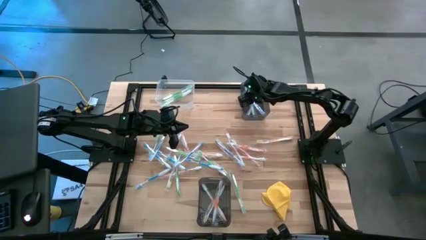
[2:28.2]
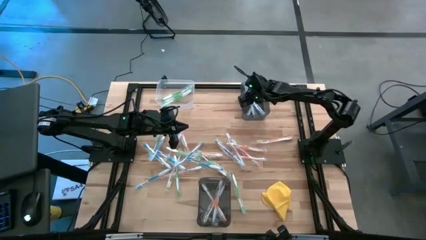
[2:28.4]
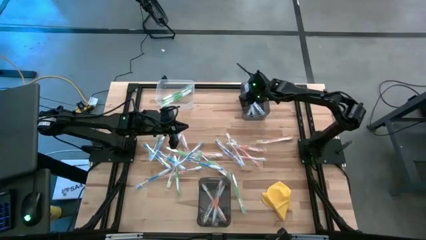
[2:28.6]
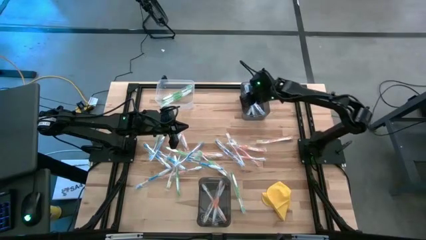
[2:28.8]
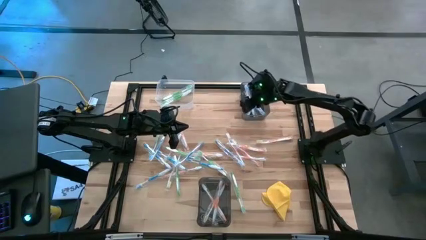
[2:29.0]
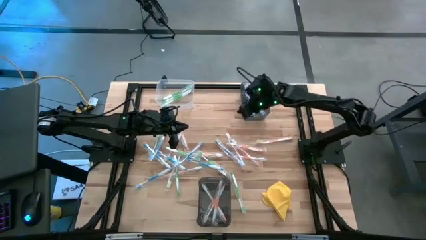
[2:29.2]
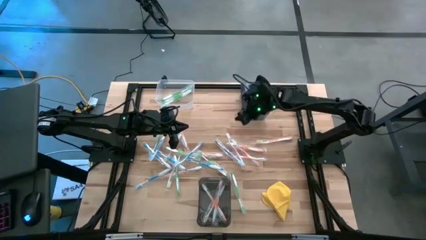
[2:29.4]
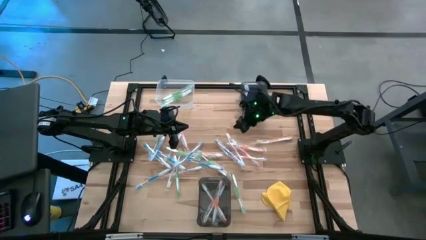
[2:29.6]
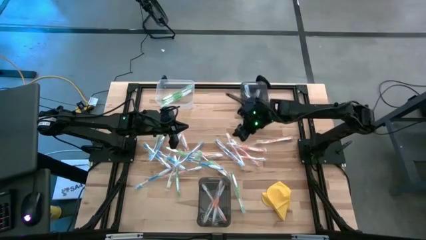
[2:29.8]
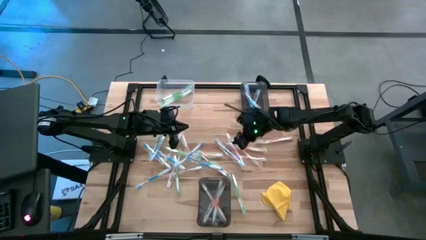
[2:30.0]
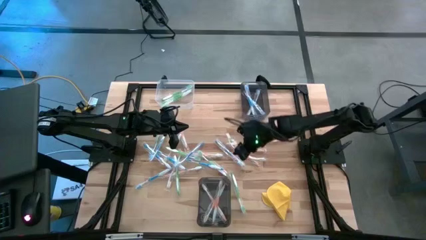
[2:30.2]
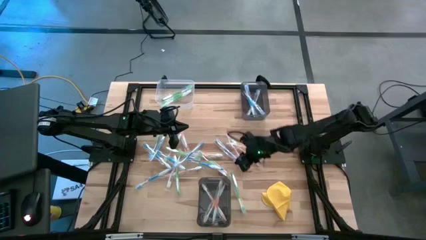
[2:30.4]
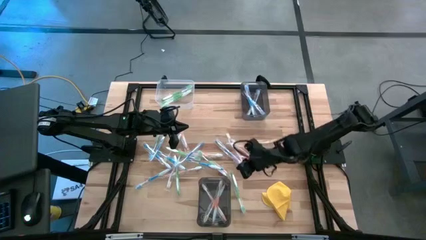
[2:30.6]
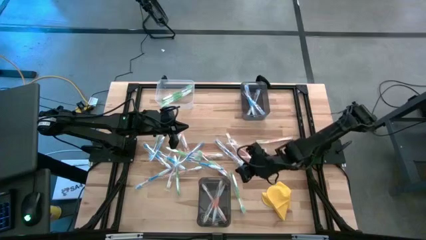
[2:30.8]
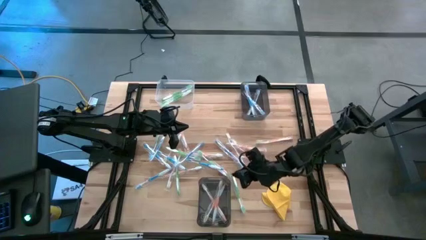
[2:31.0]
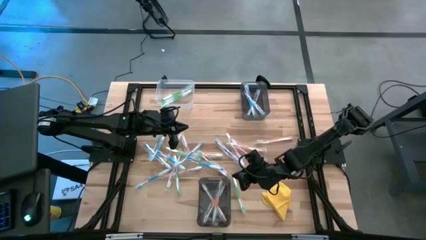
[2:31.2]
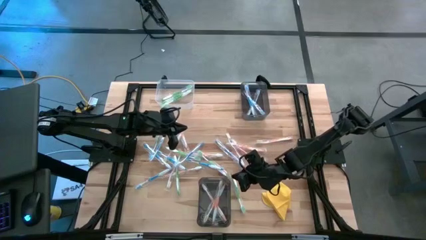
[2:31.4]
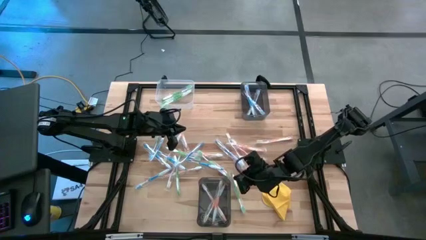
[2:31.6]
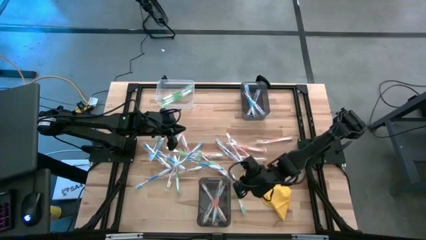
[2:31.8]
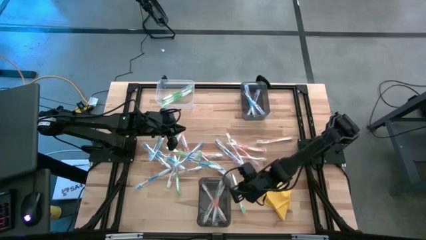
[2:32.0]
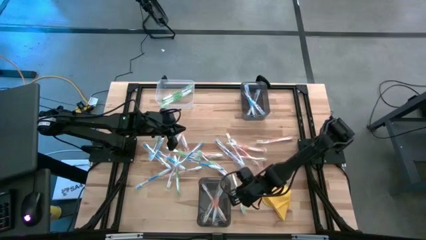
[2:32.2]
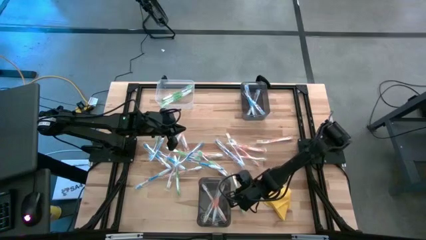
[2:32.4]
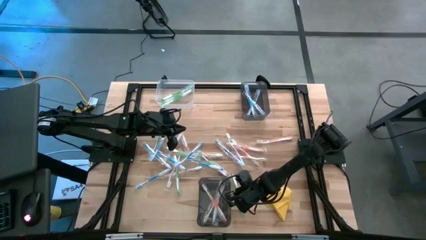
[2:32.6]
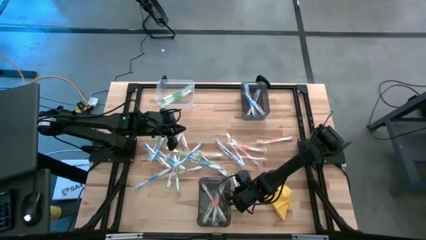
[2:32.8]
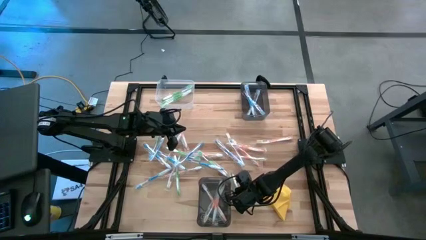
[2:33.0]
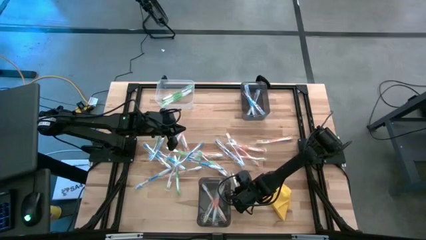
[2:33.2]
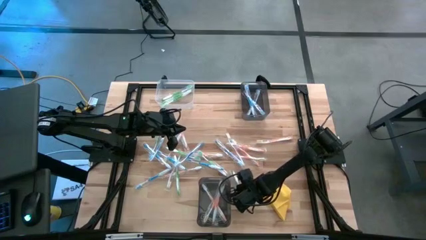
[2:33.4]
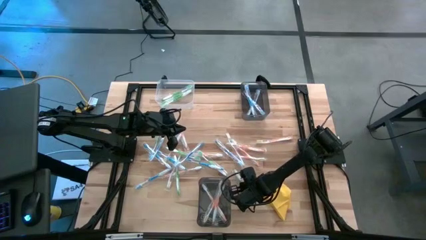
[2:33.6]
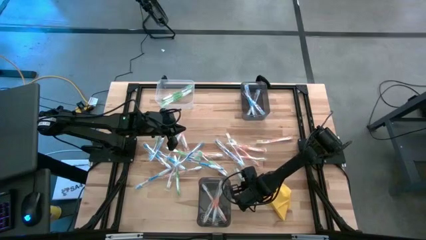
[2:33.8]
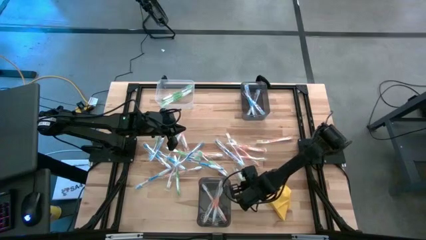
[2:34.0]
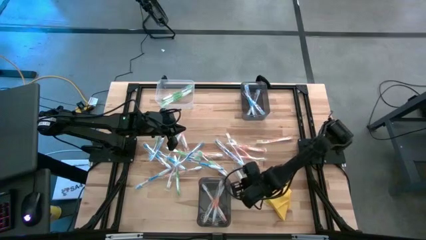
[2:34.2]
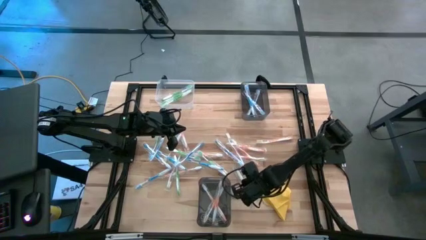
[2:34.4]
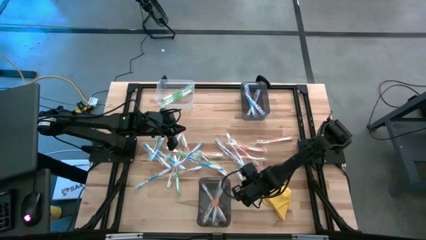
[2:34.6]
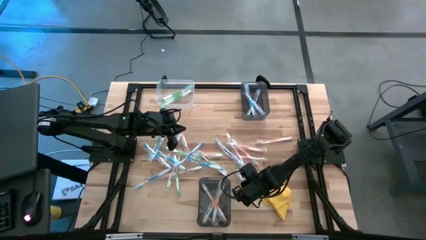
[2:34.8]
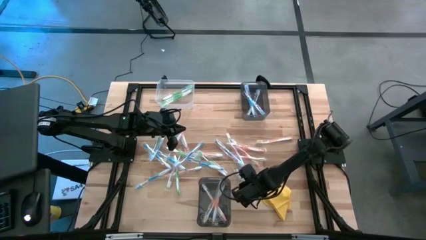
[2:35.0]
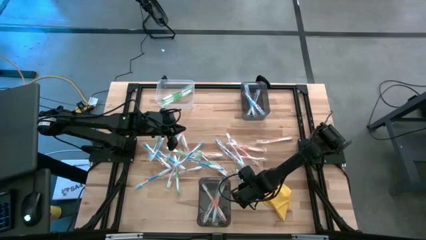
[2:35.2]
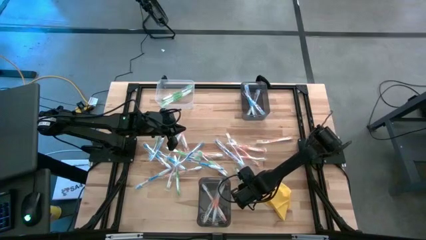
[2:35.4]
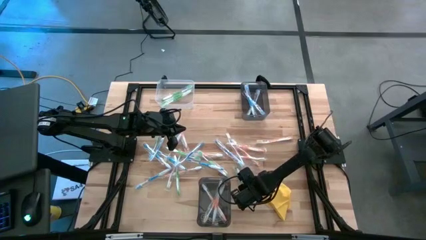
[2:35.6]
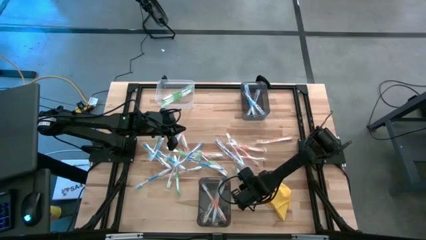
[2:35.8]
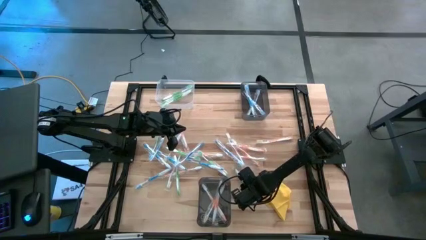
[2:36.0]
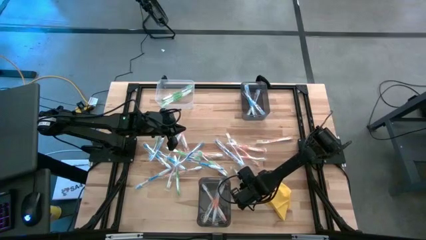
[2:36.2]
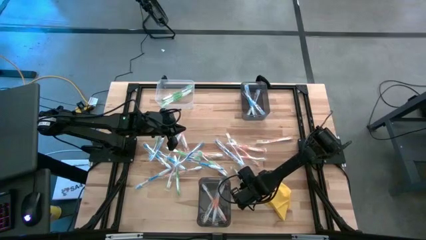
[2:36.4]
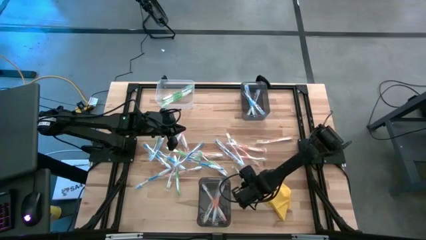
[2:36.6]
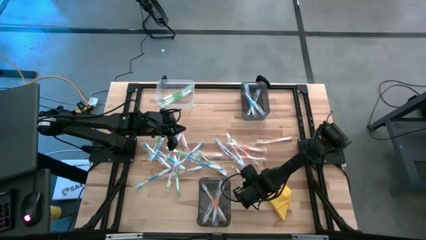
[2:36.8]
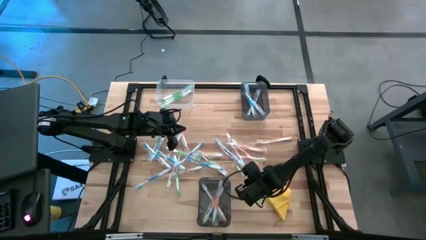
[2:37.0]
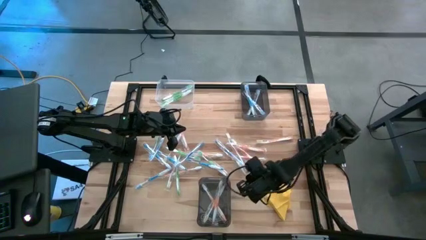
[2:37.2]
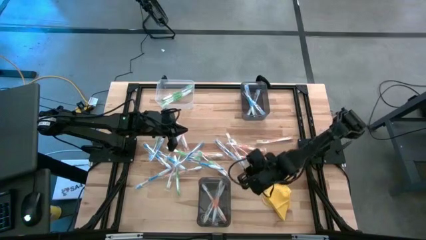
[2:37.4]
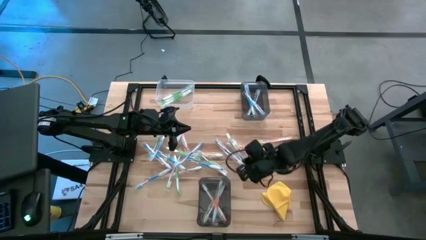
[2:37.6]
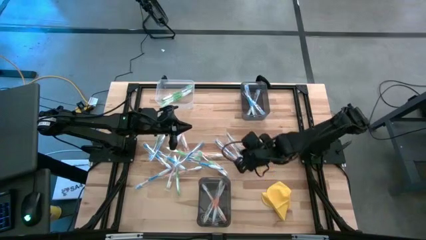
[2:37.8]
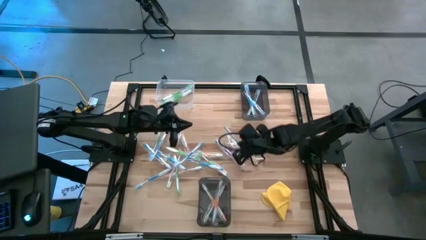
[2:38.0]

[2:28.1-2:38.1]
Task: Pick & Place Toothbrushes
Put the green toothbrush into the transparent bin

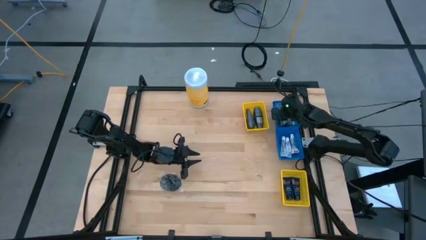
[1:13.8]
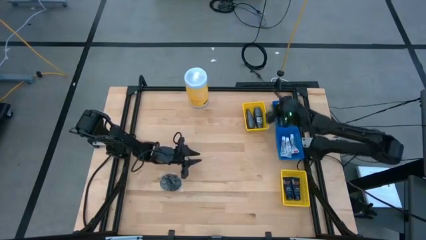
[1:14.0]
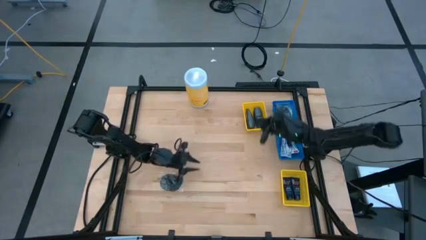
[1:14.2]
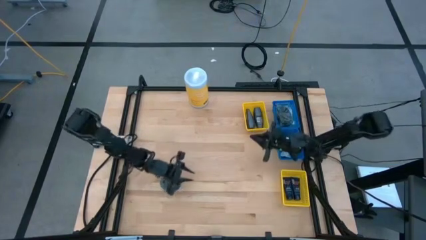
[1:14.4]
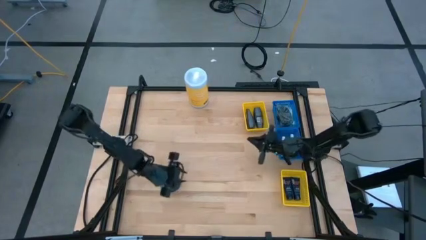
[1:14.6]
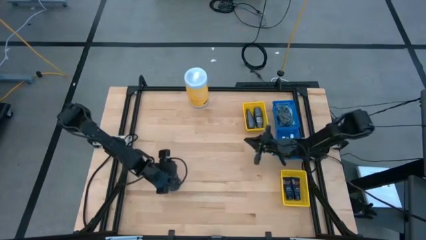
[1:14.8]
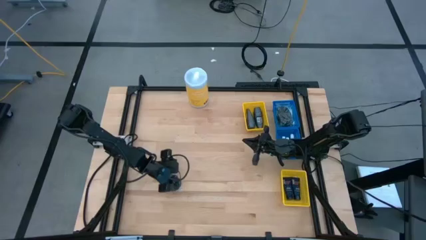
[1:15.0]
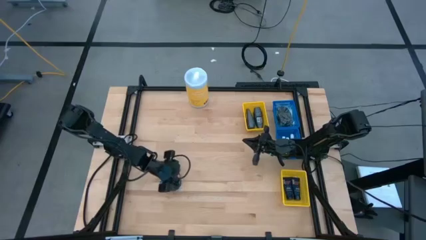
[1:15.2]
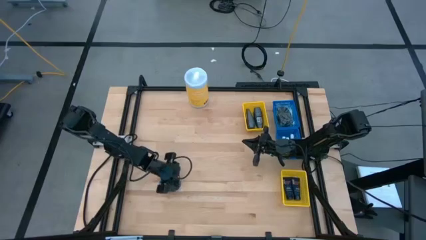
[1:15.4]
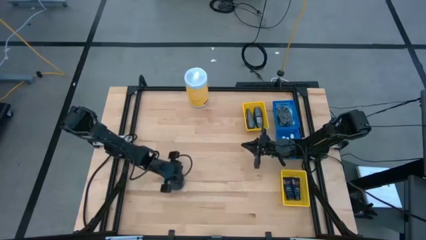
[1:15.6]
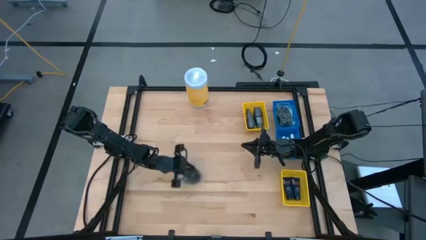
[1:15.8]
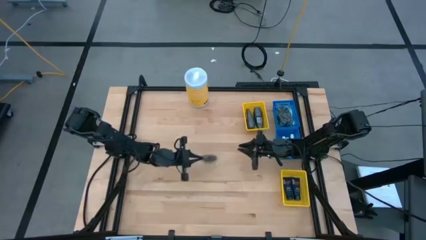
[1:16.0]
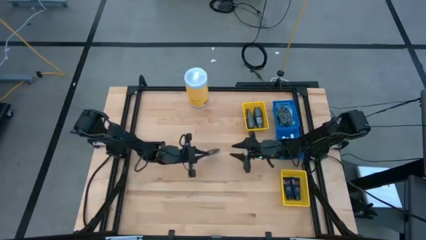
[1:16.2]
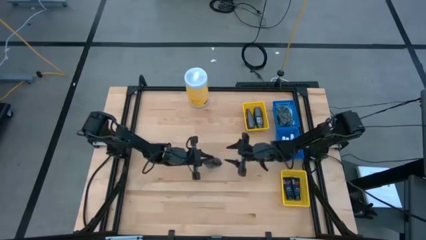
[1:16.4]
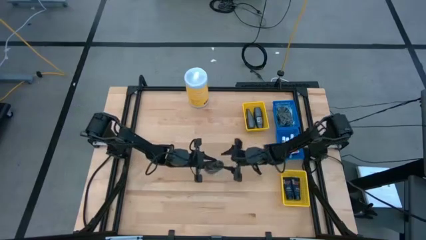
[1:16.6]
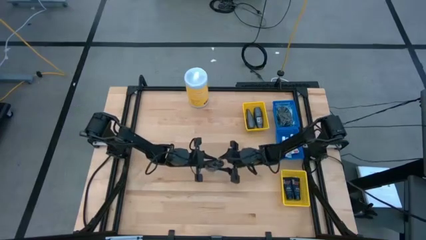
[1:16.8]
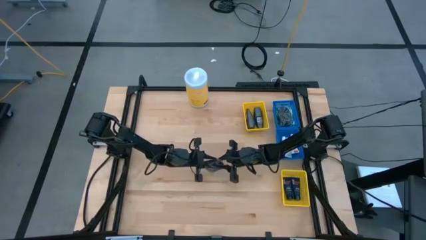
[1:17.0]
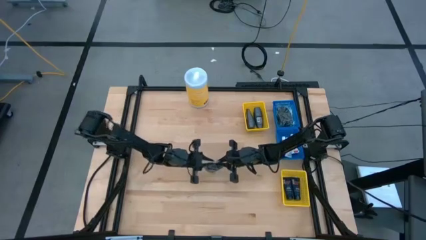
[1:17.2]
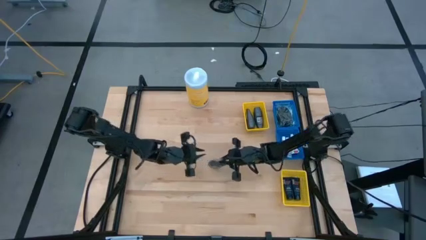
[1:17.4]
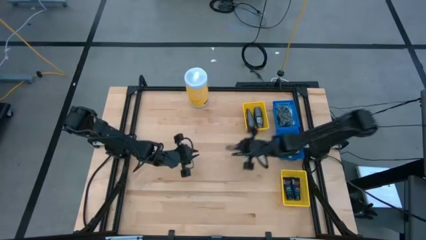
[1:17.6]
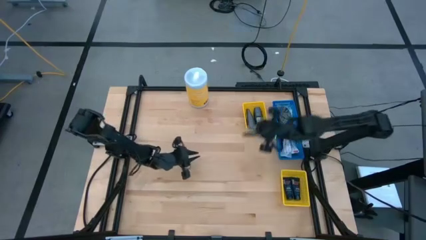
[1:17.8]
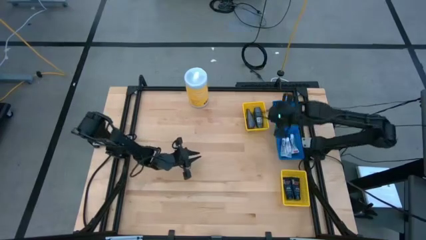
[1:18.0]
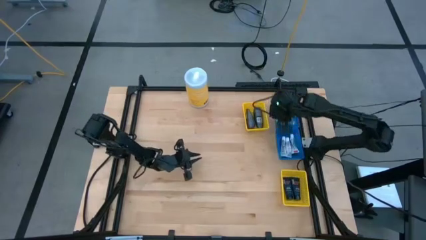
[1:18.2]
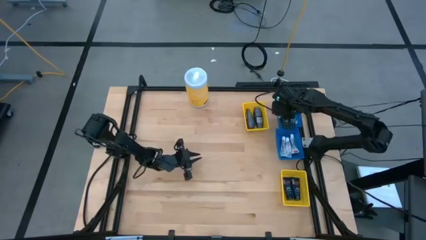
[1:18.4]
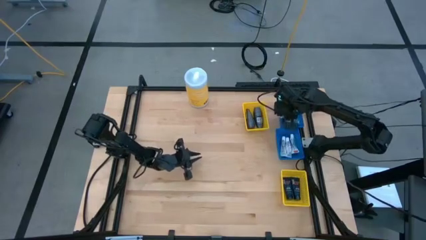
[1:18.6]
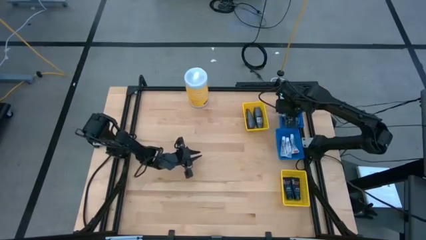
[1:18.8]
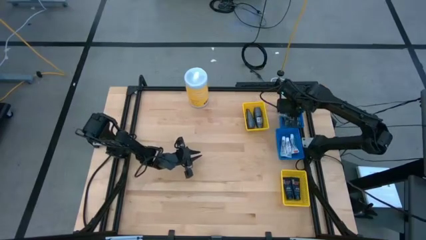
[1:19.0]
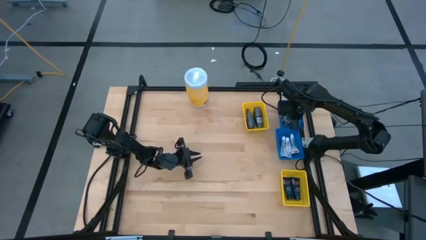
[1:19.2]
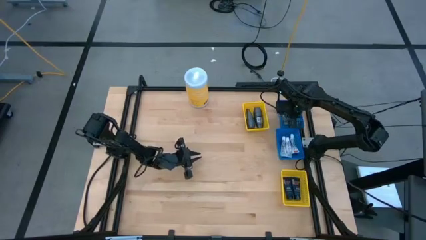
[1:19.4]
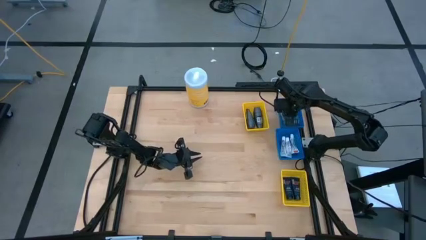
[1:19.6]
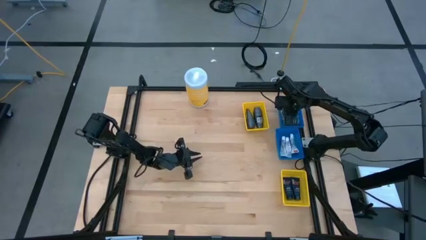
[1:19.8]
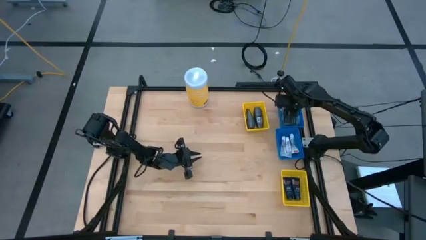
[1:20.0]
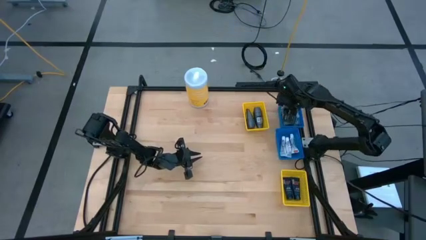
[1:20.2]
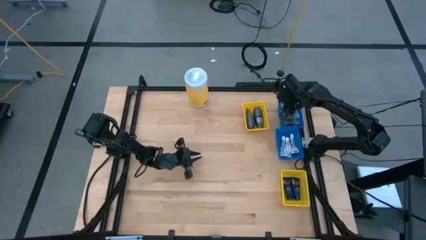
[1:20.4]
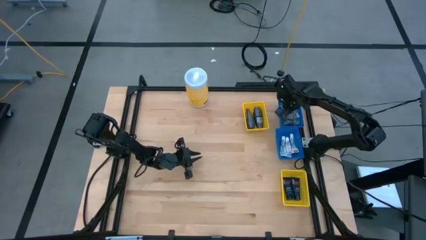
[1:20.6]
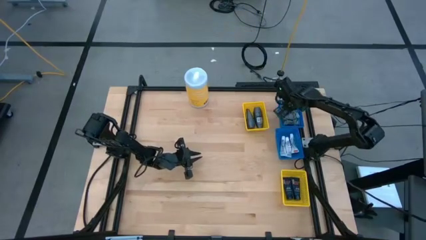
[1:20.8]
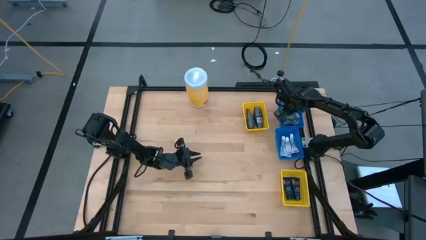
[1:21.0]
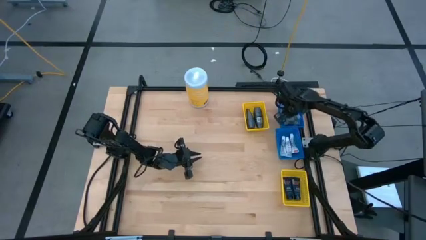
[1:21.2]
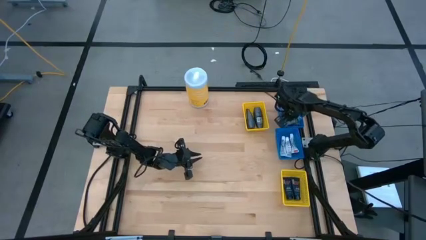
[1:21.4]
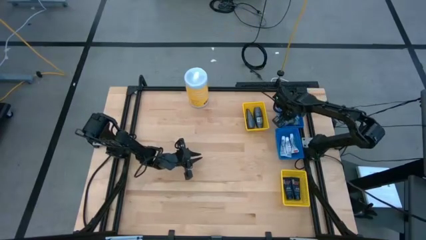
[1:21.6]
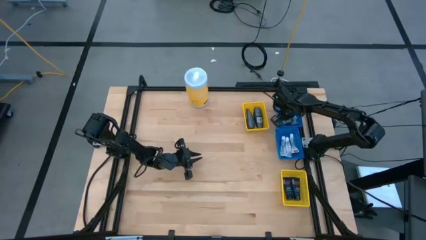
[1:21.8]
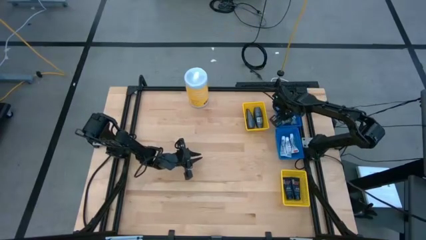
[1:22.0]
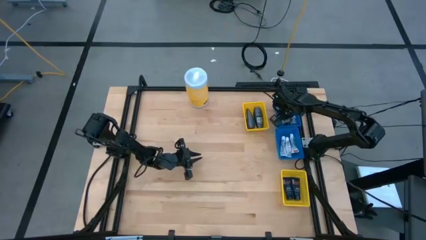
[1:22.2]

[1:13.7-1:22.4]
Task: Pick & Place Travel size toiletries
Put the black hairbrush into the top blue basket
